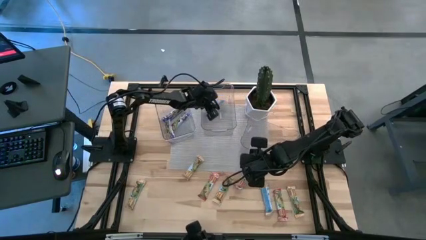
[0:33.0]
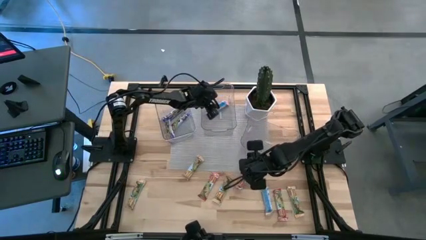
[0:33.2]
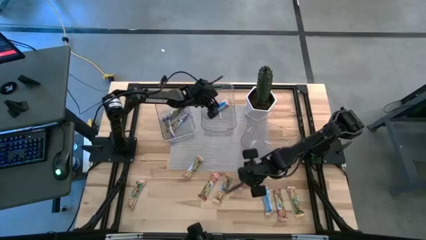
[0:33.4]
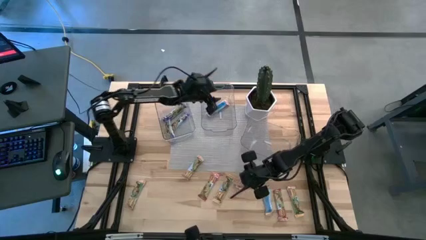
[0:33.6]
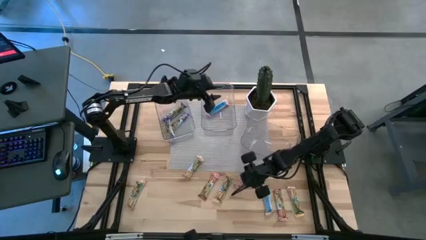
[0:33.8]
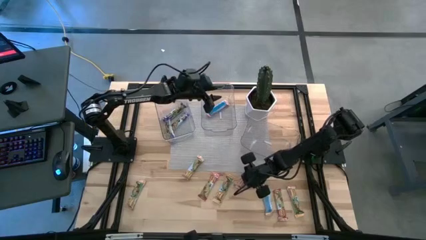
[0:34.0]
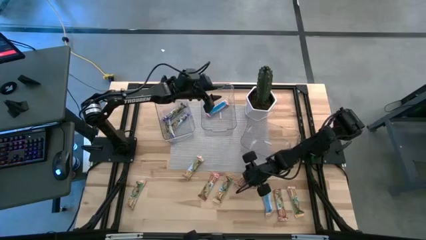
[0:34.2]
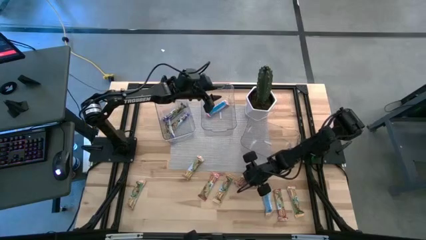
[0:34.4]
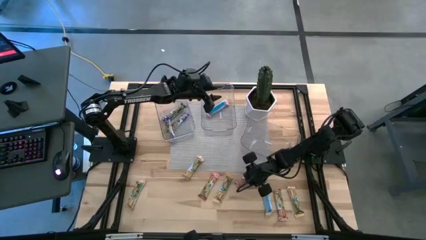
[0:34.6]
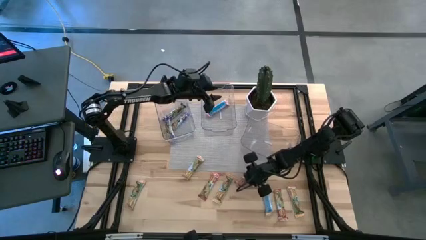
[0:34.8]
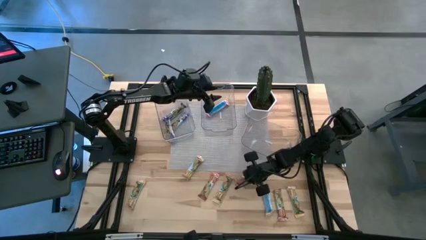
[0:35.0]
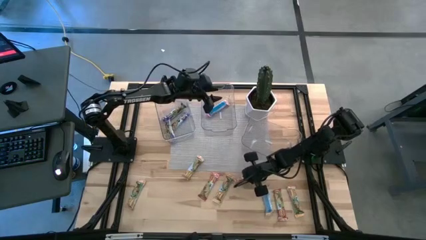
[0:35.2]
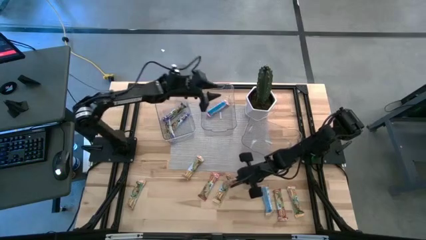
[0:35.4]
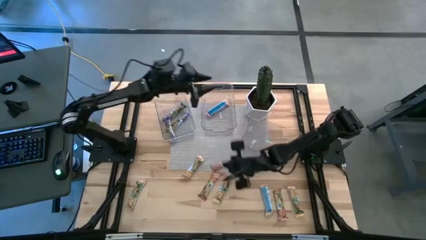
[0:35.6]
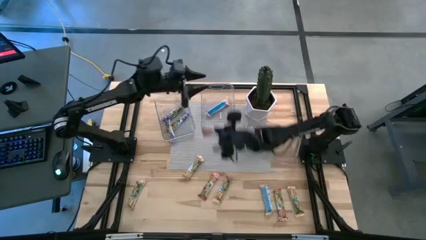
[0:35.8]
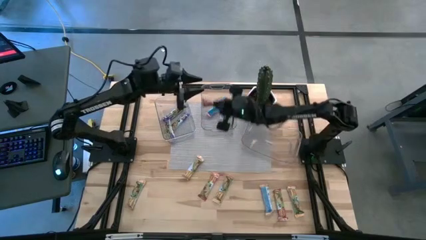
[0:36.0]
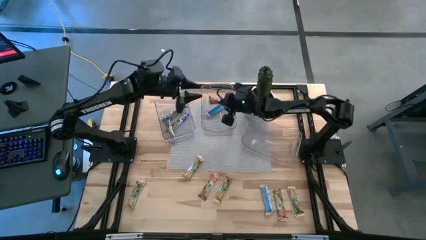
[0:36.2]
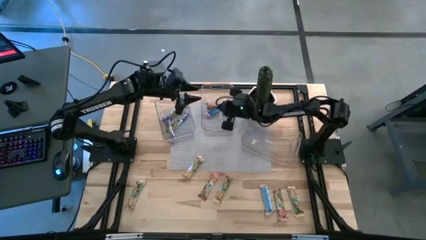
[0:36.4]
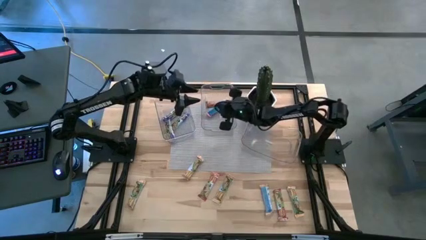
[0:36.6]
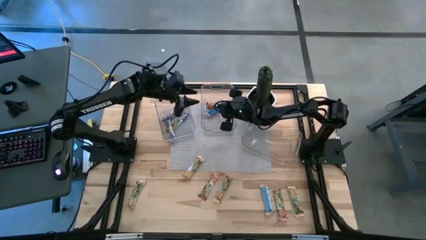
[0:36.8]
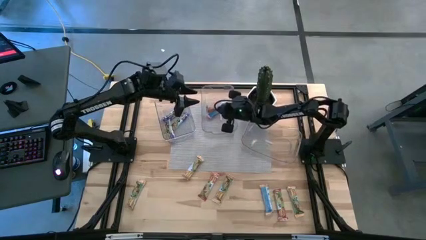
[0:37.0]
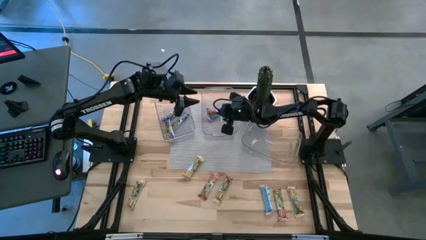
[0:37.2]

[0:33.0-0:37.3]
Task: Pick and place Granola Bars by type
Put the red granola bar into the middle bin

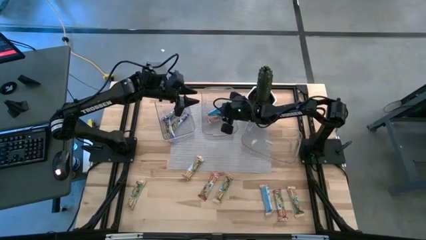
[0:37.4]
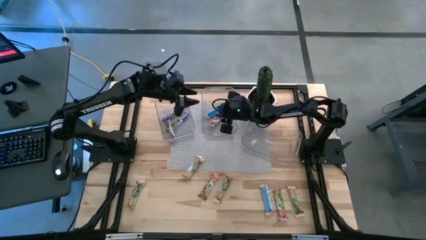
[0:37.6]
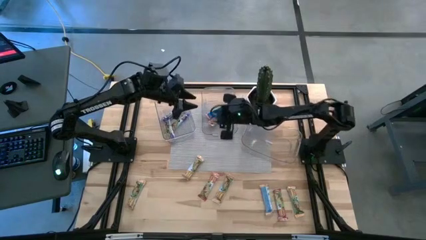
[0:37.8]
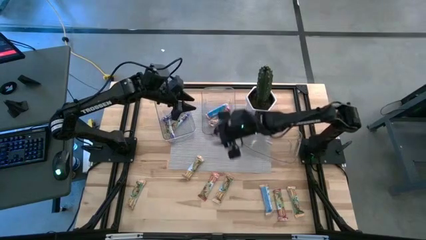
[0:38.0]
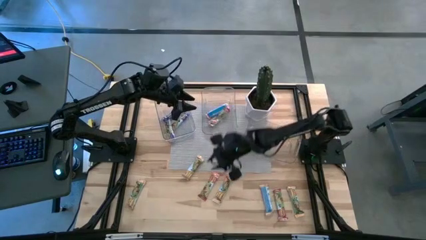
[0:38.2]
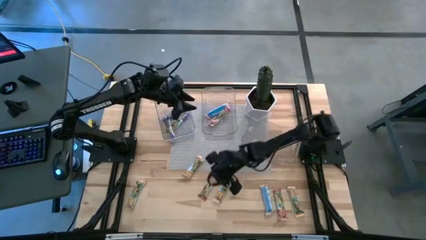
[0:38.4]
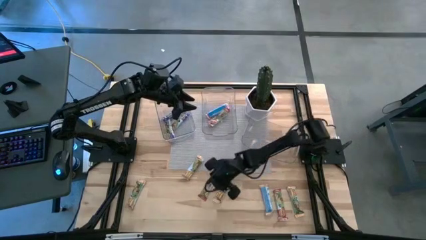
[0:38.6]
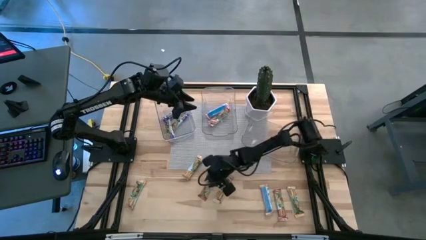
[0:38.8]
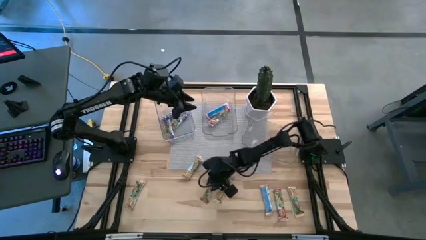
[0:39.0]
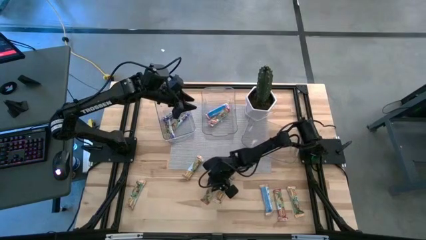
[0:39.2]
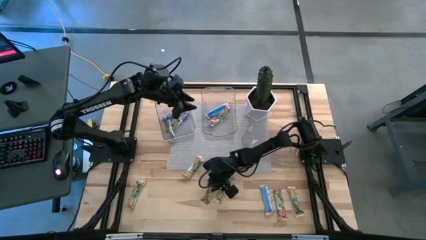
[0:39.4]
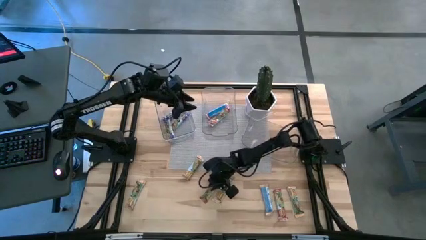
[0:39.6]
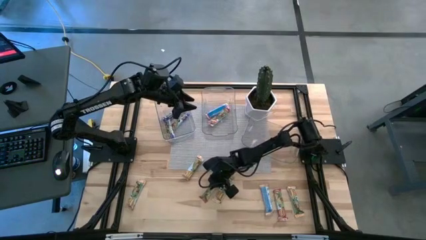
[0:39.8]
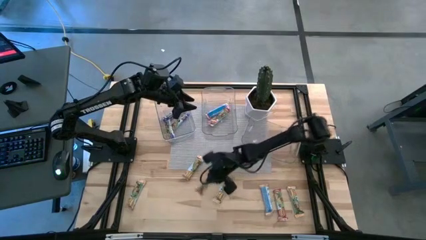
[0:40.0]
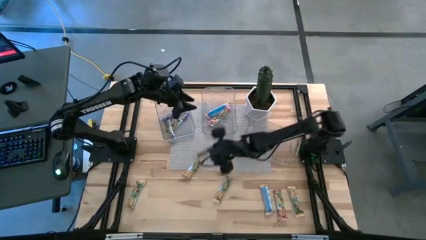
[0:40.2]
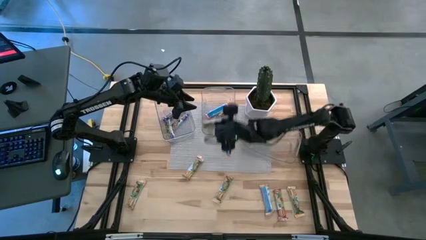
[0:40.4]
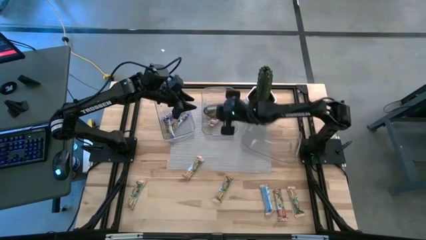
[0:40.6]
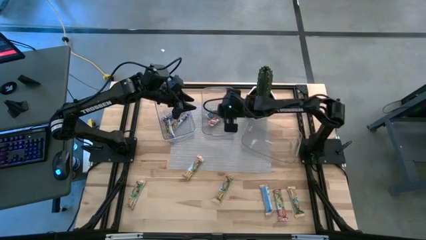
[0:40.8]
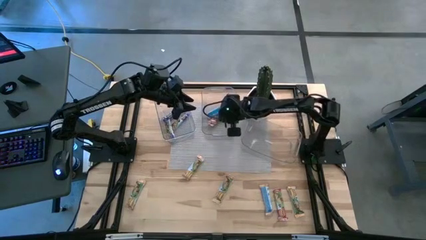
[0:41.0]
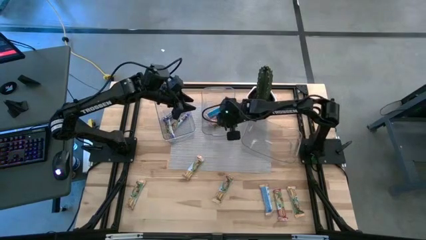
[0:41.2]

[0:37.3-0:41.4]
Put the red granola bar into the middle bin

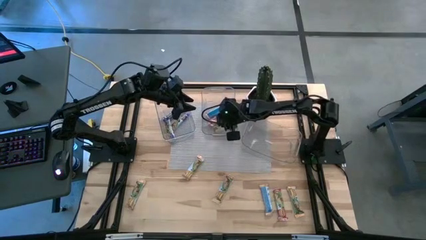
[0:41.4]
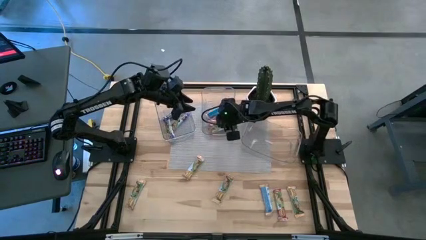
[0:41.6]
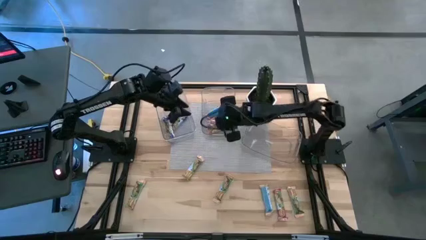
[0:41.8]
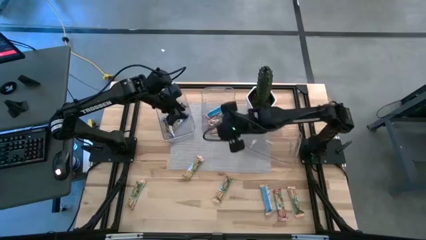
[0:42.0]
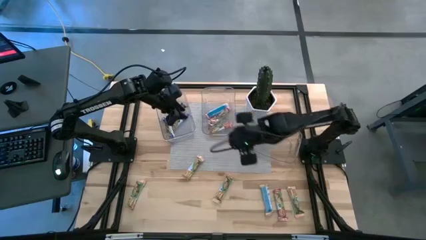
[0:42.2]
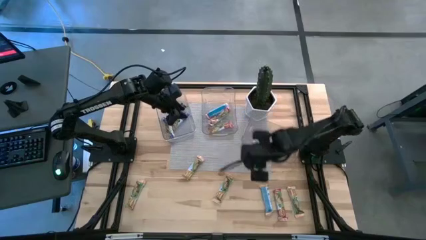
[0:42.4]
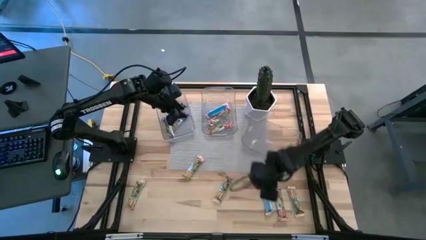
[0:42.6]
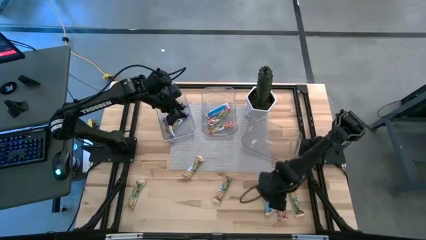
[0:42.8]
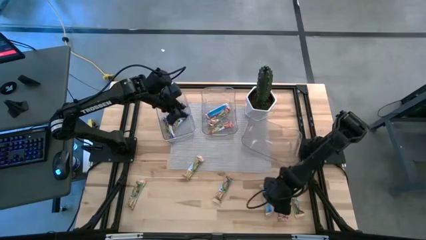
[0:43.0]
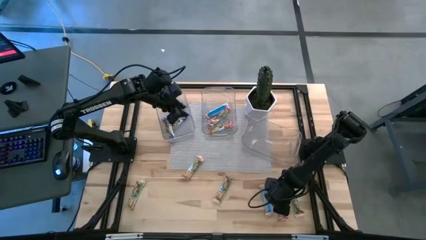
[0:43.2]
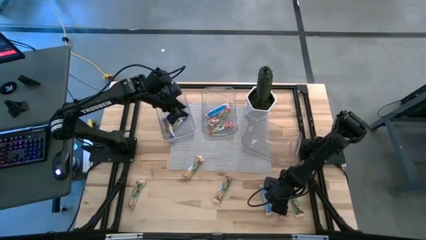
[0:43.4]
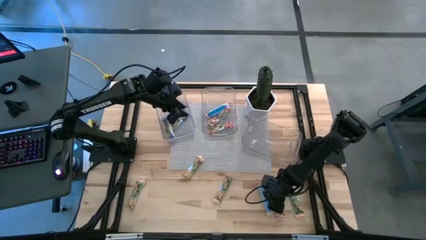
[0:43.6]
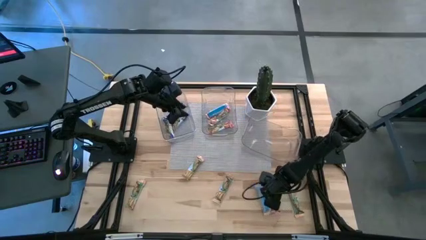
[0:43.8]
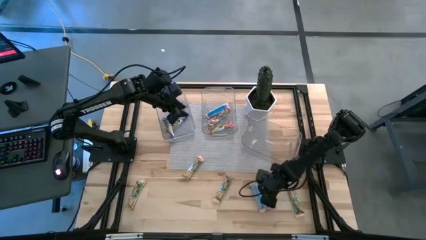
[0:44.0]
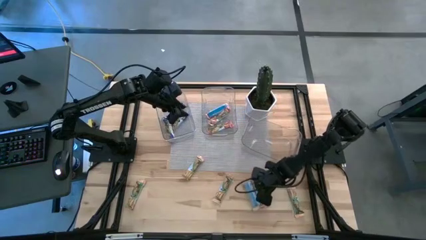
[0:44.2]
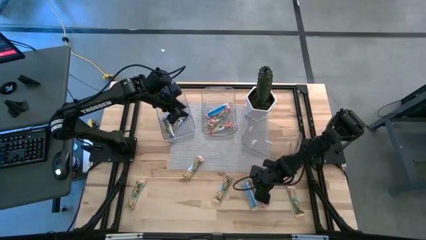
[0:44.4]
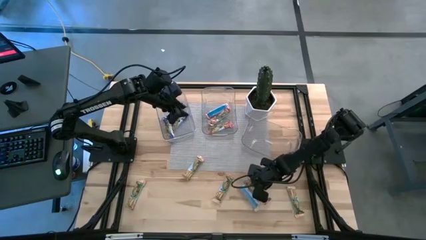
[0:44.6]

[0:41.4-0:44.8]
Put the red granola bar into the middle bin

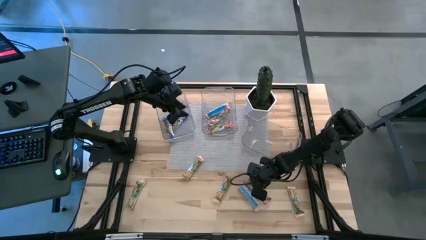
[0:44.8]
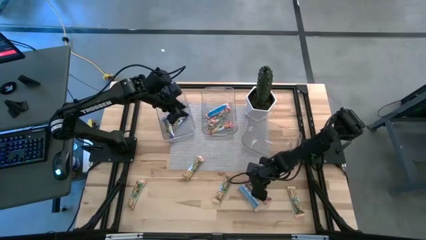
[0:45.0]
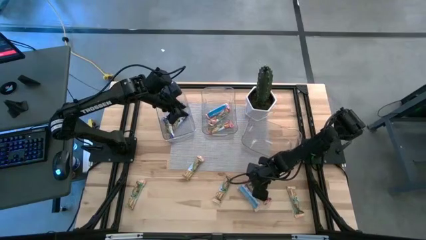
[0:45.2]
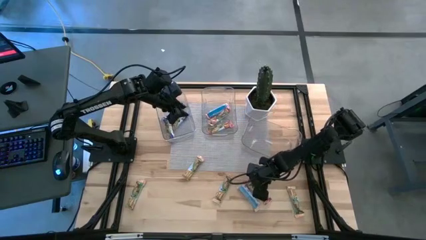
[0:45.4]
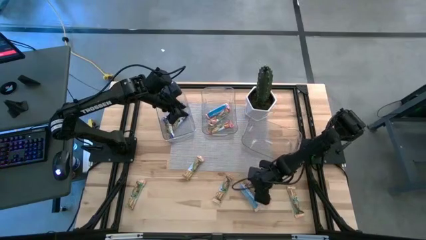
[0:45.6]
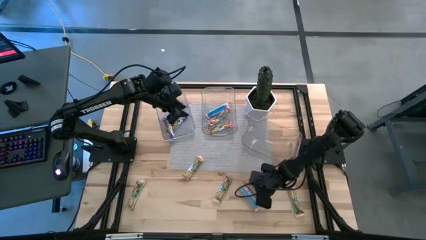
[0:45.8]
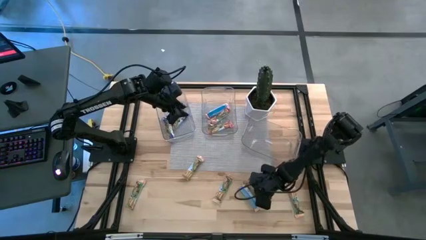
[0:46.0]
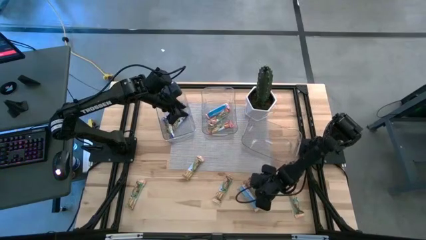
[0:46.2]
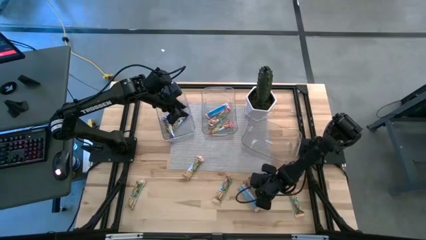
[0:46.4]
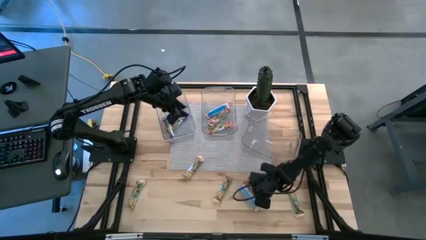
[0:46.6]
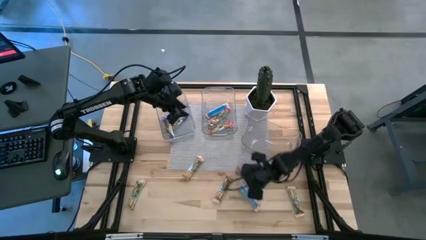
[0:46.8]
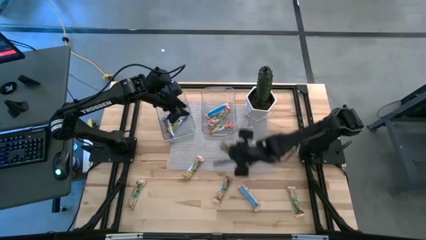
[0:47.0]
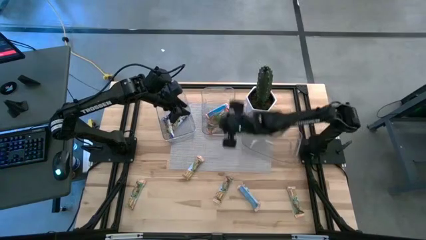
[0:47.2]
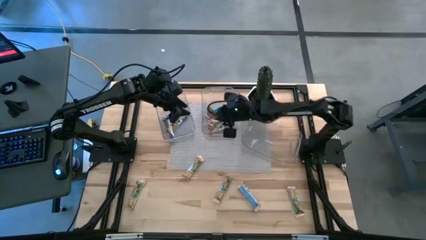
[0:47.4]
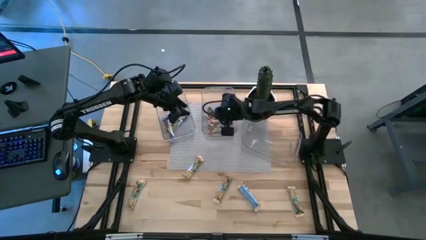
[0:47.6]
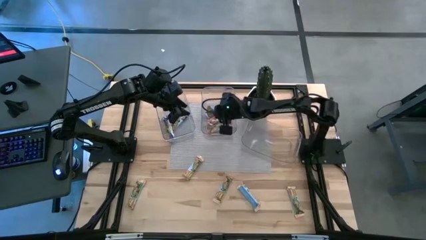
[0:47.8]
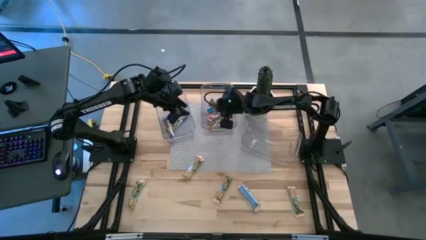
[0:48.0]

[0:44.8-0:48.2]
Put the red granola bar into the middle bin

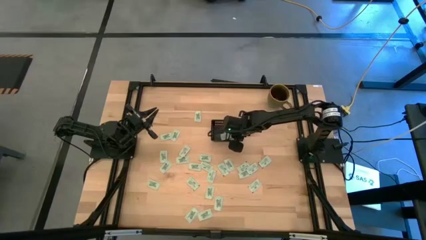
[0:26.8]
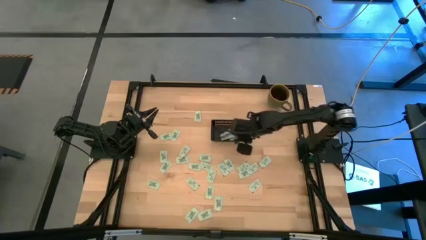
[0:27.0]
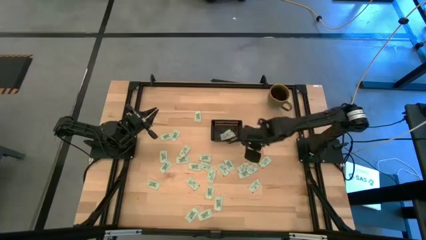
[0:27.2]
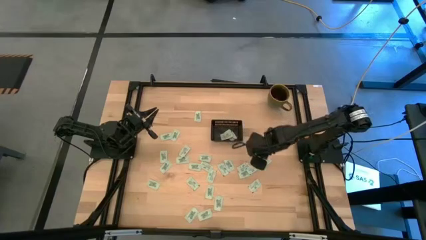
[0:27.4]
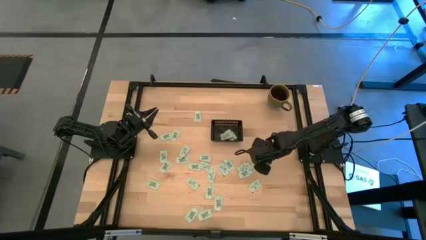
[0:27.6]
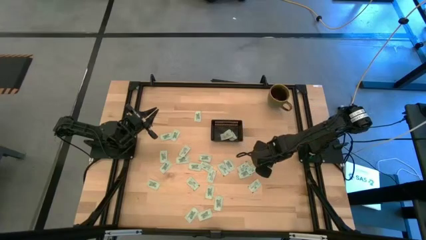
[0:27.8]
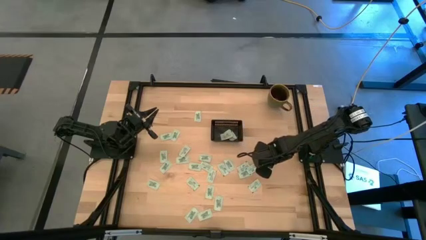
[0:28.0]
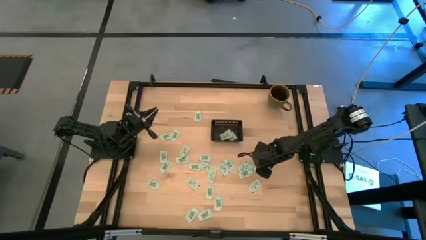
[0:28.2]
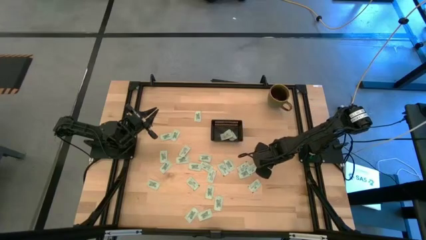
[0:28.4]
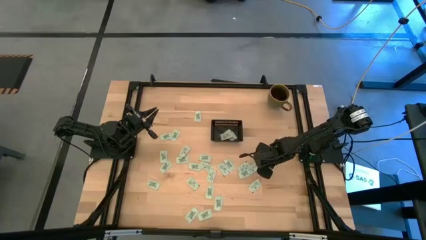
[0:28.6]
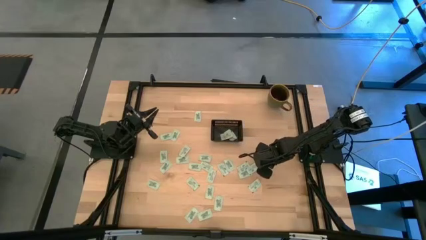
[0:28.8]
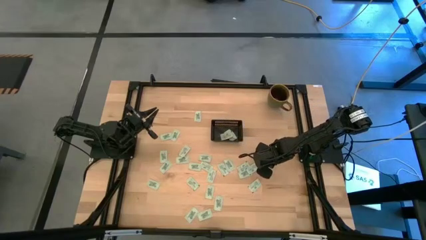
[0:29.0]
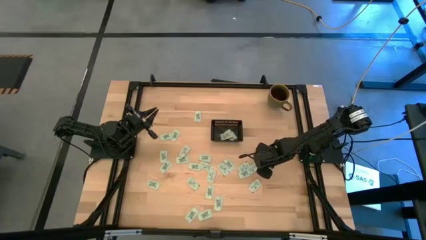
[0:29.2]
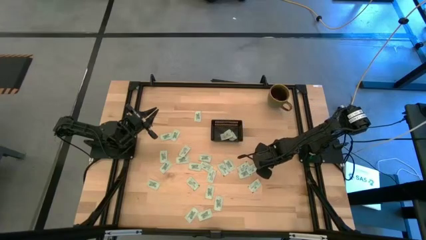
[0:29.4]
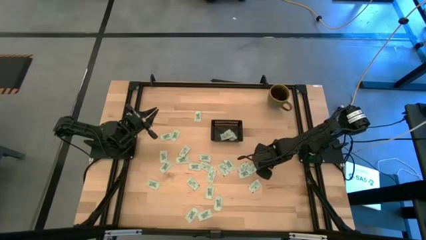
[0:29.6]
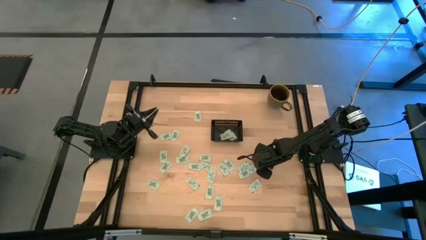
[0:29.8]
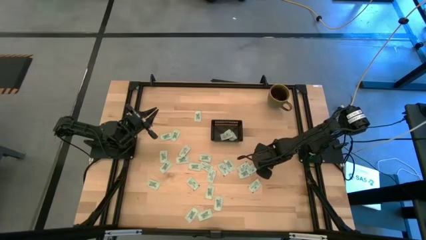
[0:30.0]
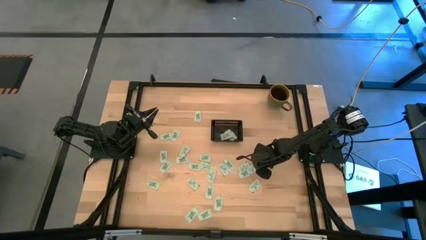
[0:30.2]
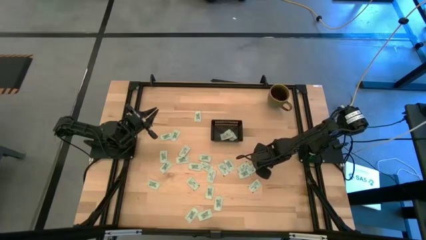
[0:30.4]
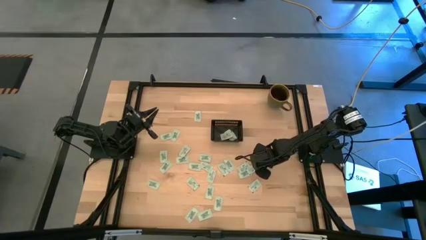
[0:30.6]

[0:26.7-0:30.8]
Task: Pick and place Stevia / Truvia into bins
Put the stevia packet into the black basket
